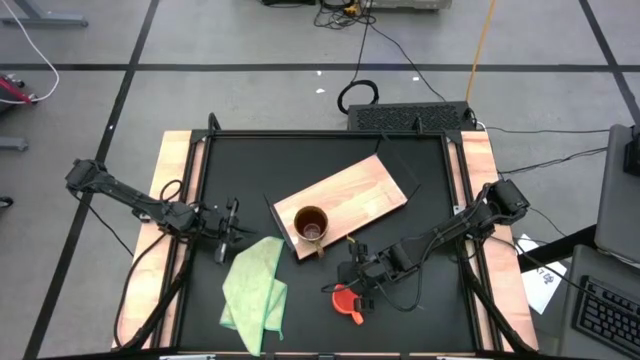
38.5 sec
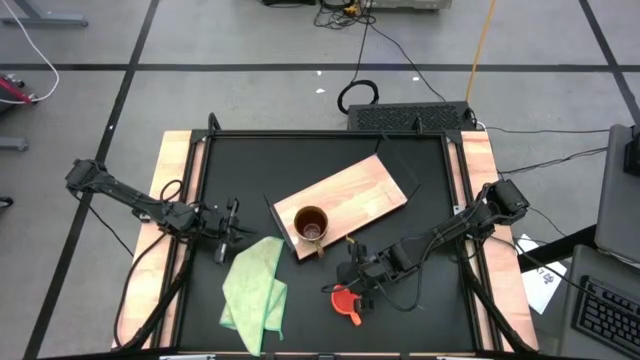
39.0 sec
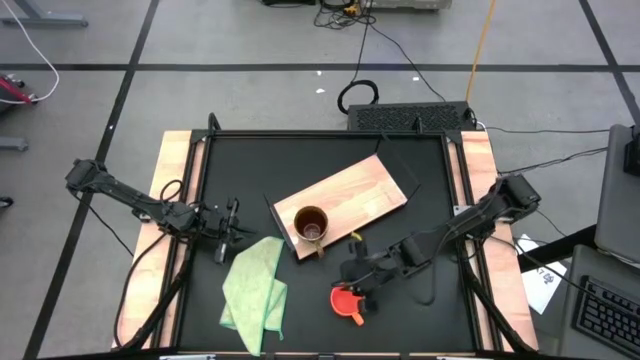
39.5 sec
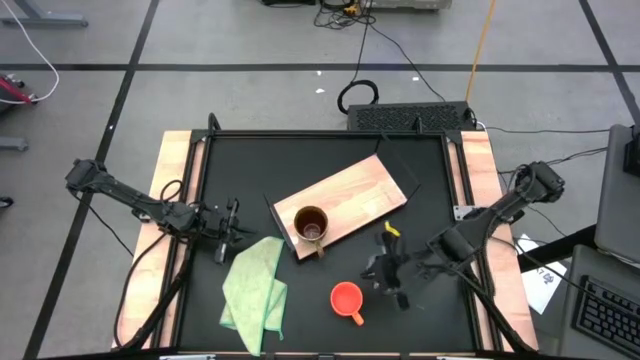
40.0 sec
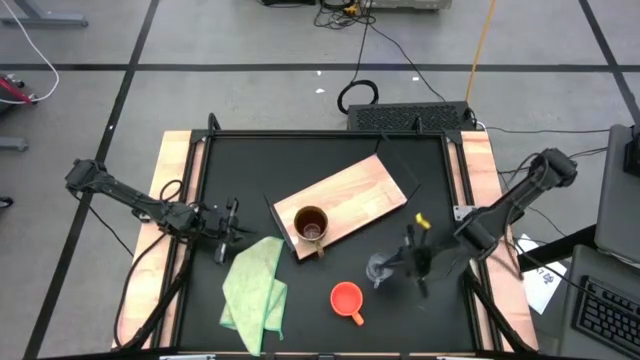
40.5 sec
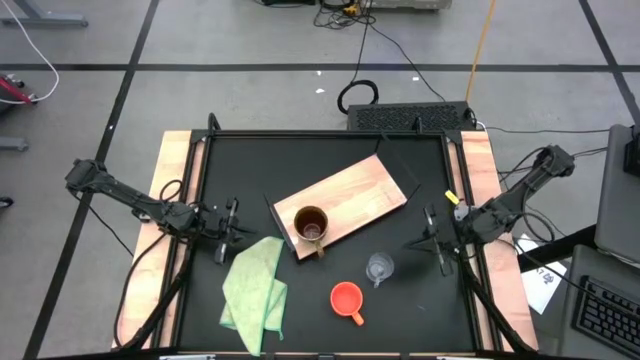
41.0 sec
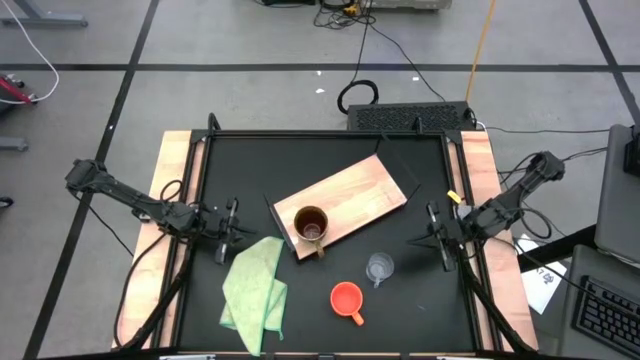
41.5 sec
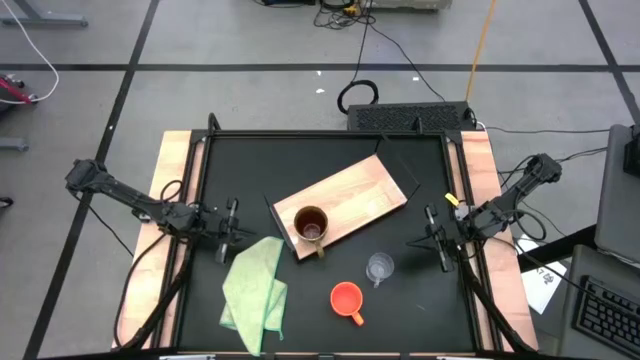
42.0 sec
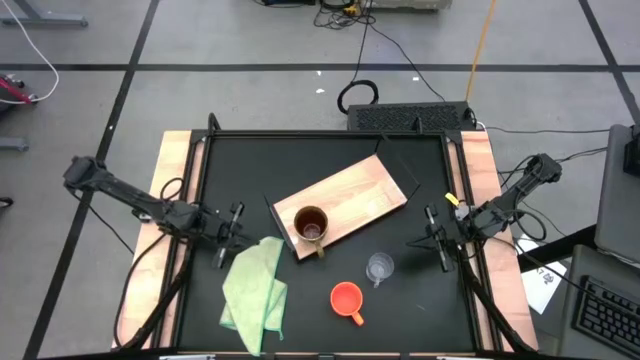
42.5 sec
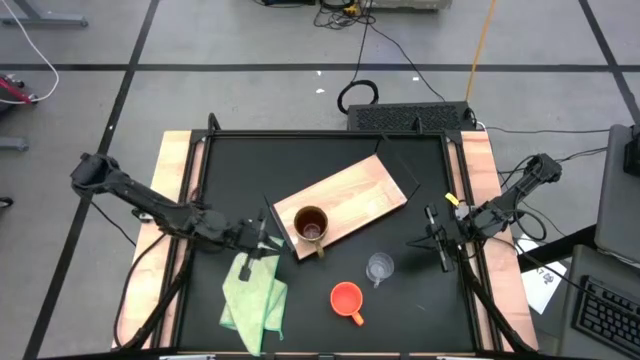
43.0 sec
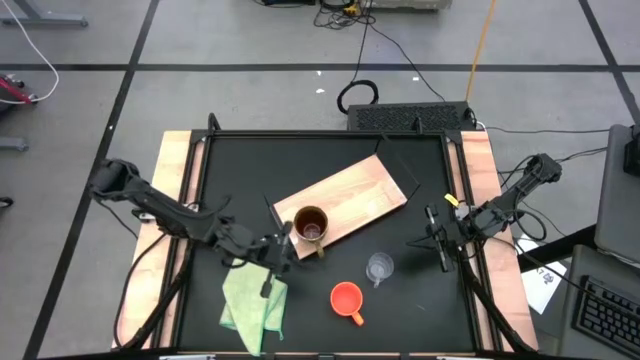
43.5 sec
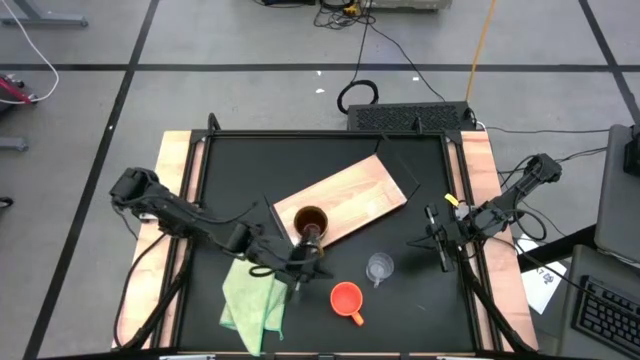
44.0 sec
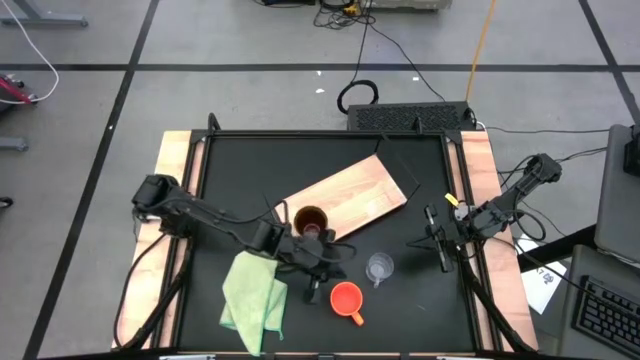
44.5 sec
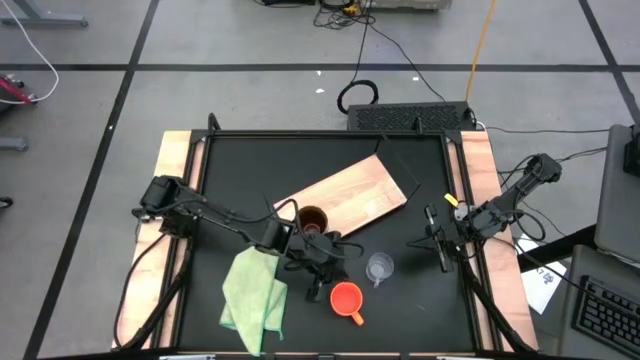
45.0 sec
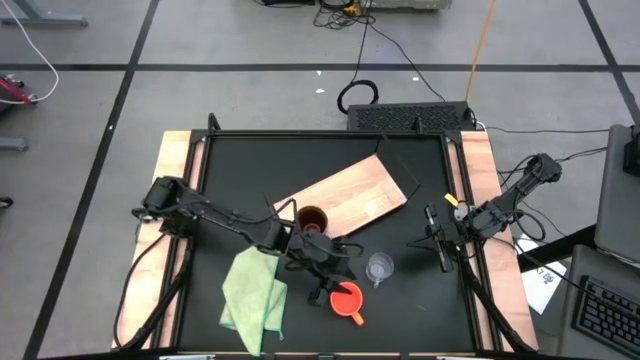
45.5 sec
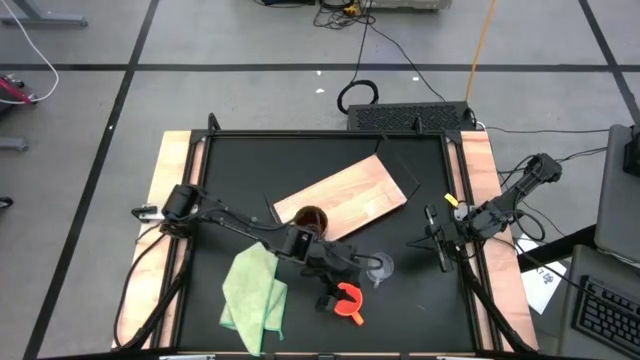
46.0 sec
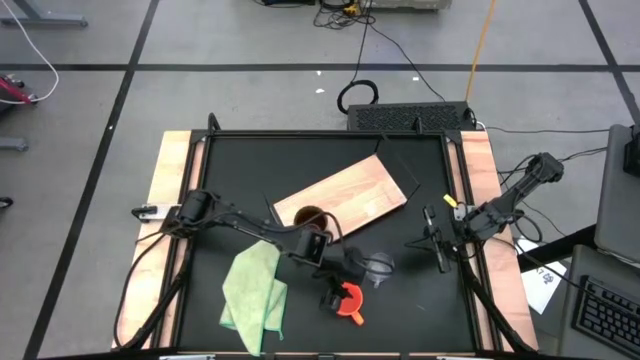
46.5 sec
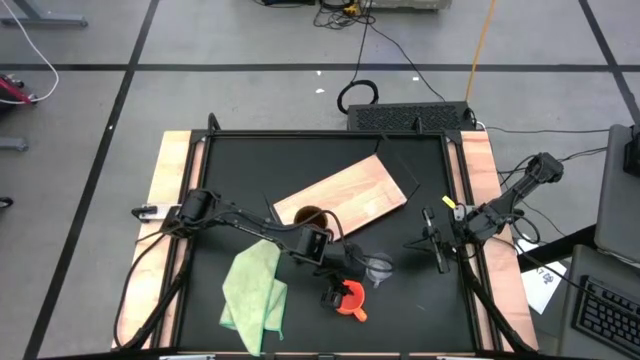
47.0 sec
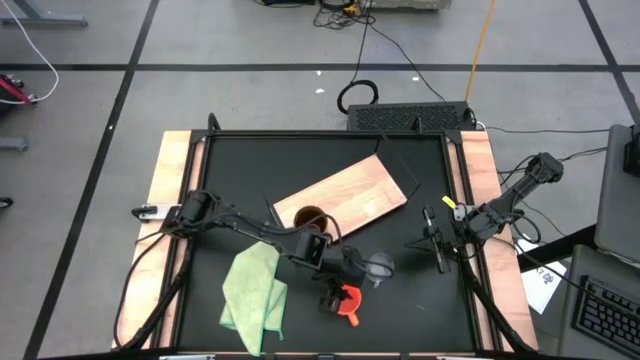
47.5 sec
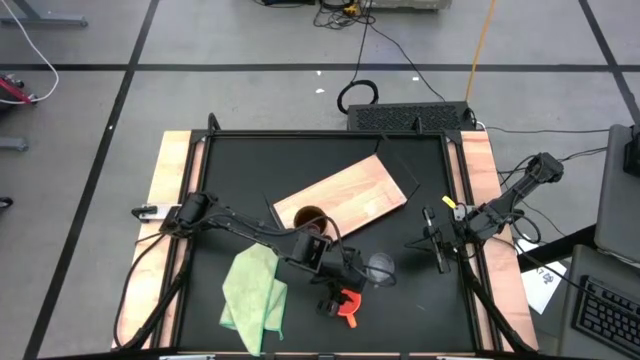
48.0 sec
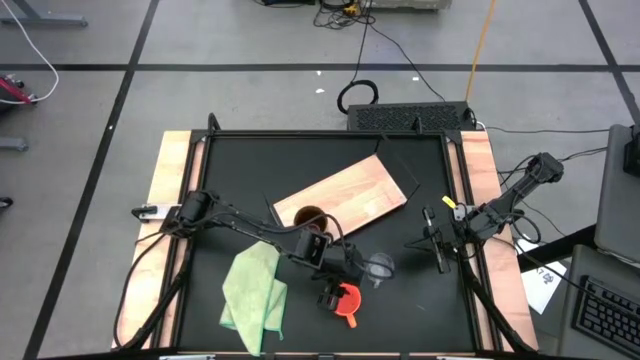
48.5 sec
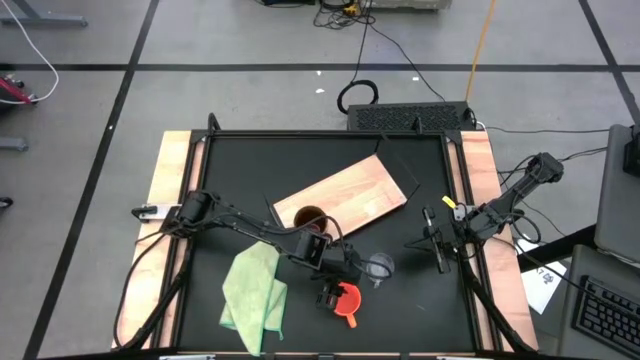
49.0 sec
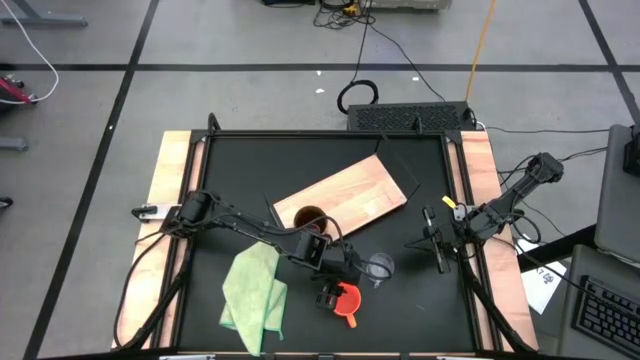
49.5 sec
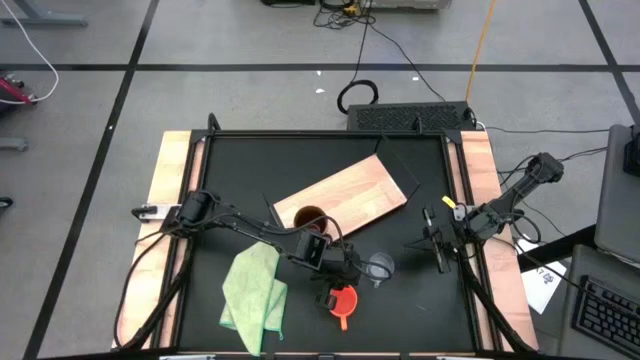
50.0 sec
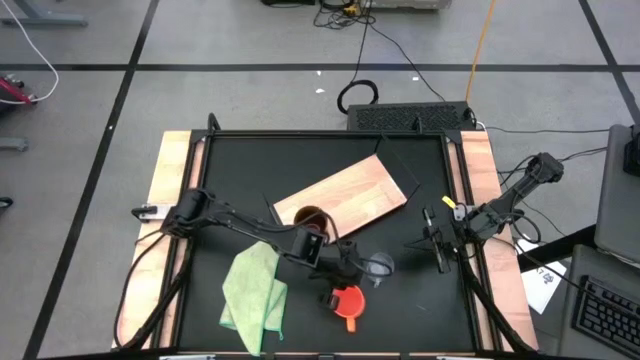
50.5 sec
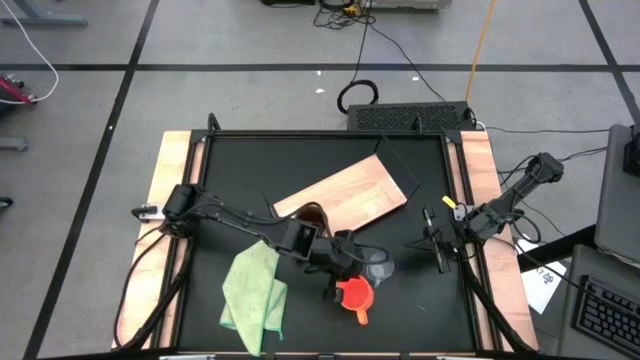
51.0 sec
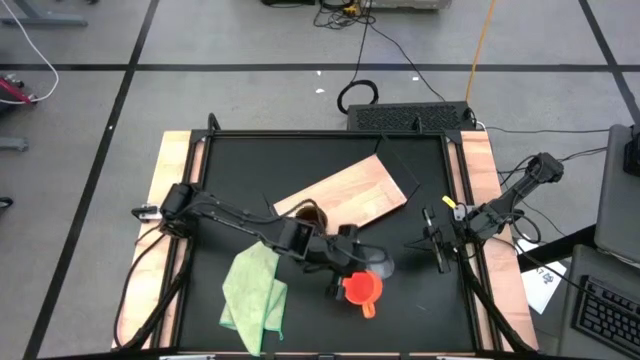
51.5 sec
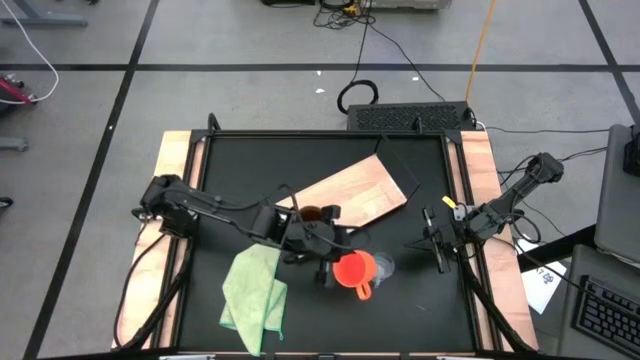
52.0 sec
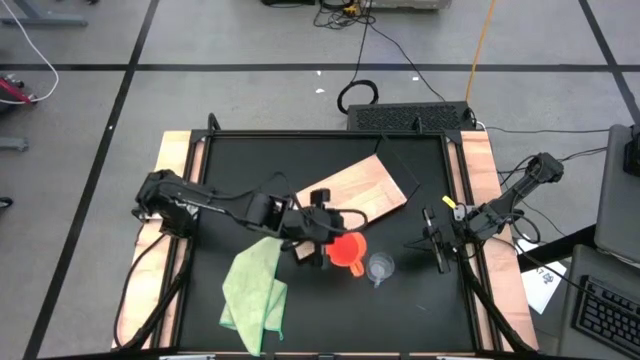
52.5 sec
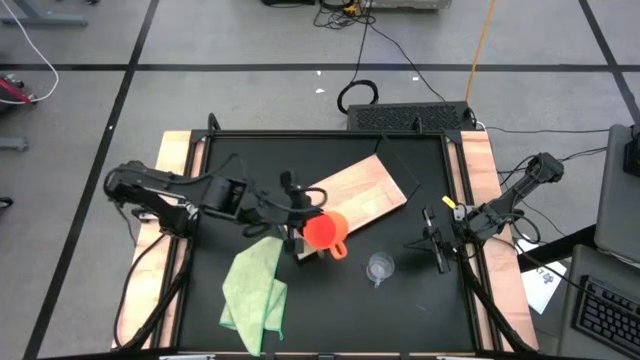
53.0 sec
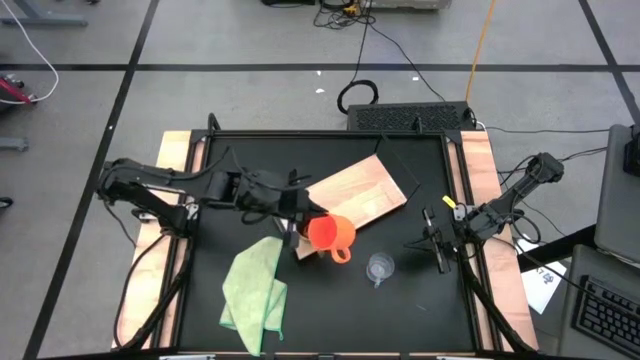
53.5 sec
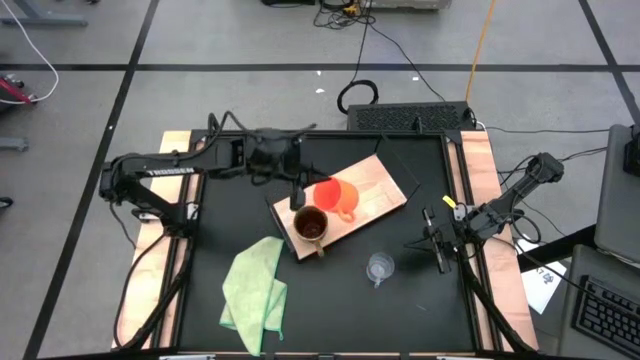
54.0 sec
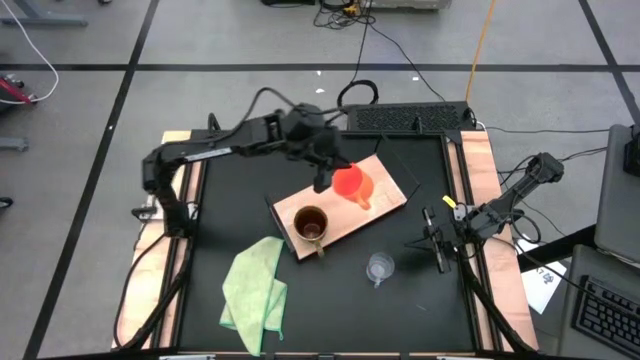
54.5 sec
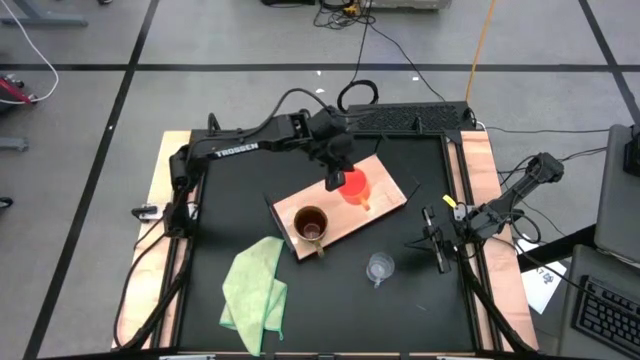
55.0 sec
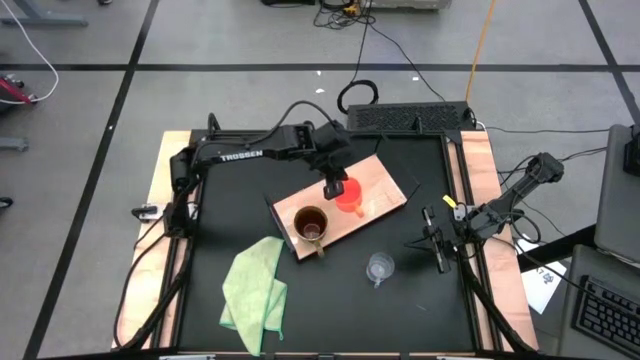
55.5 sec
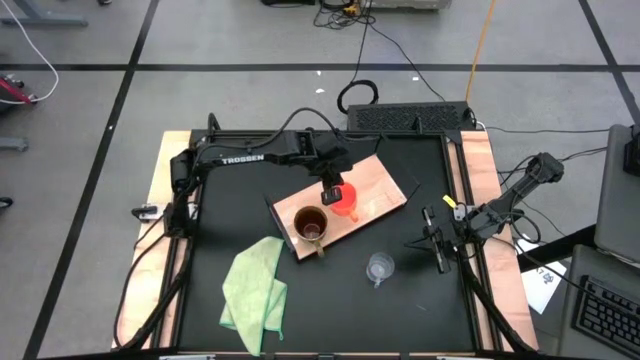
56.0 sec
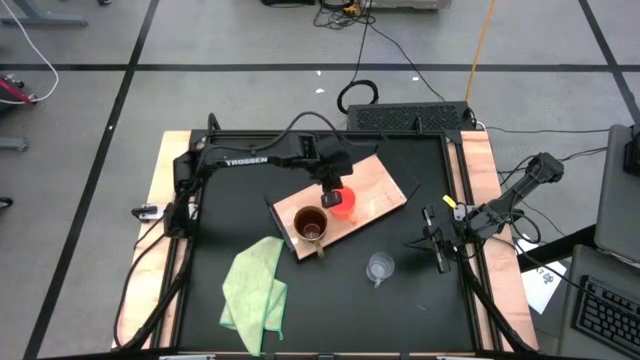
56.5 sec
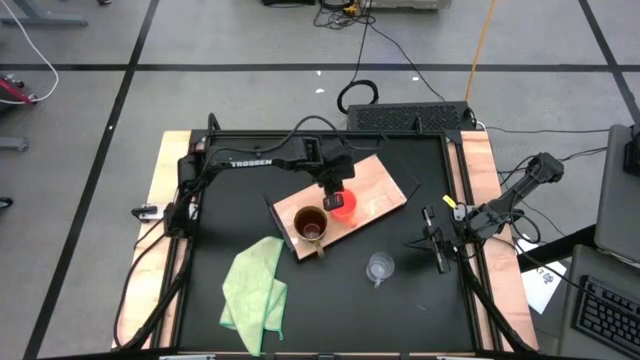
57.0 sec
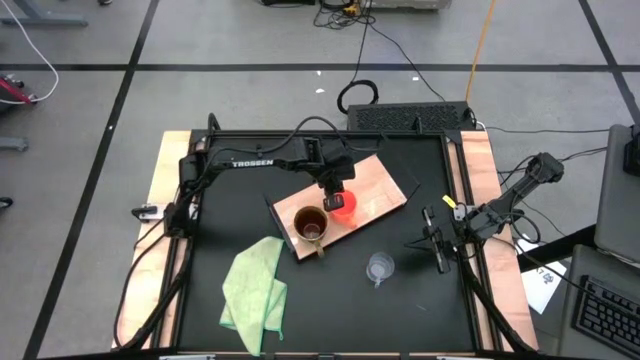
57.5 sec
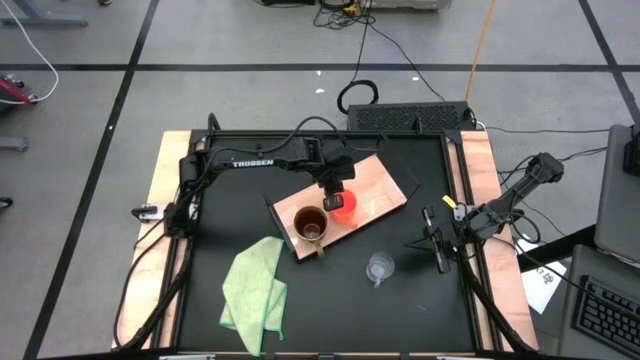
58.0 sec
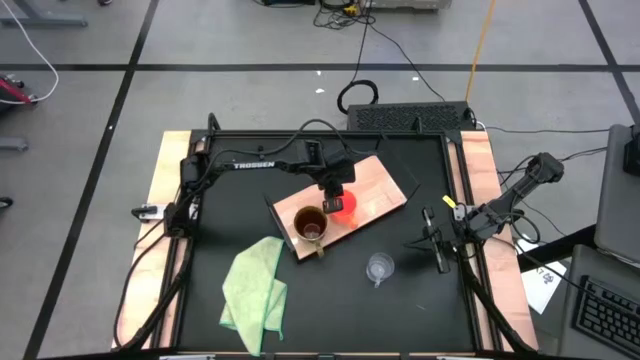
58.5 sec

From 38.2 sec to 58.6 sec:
Task: Stack small to large cups/mugs on shelf
Put the orange mug on the shelf
